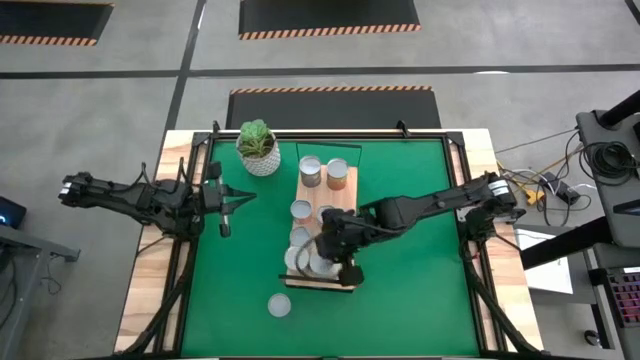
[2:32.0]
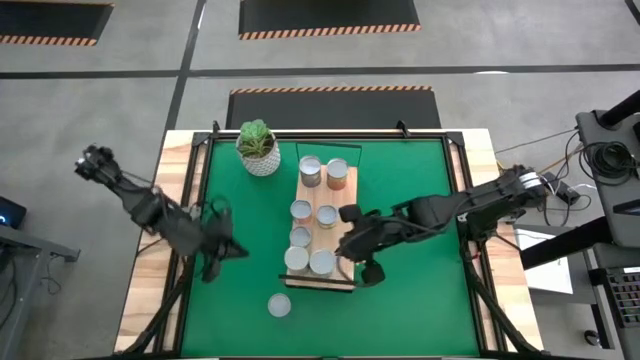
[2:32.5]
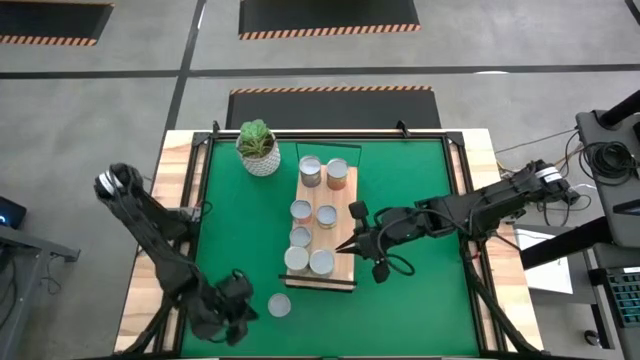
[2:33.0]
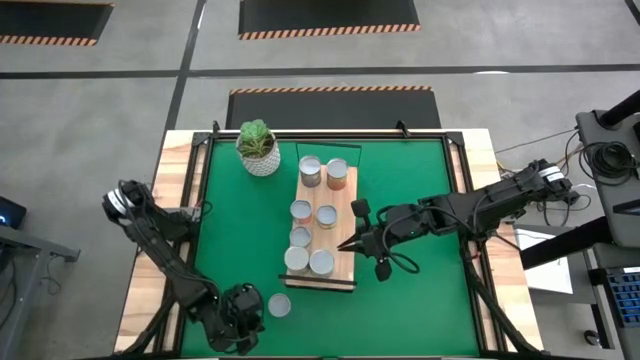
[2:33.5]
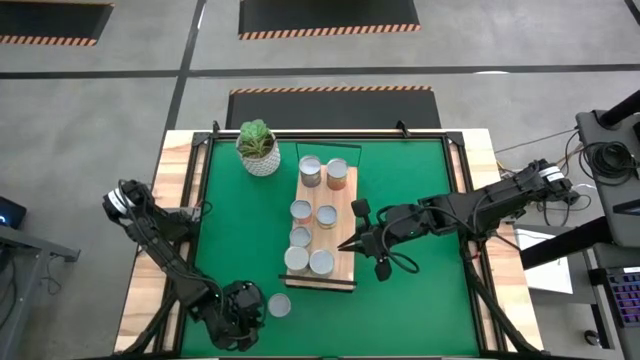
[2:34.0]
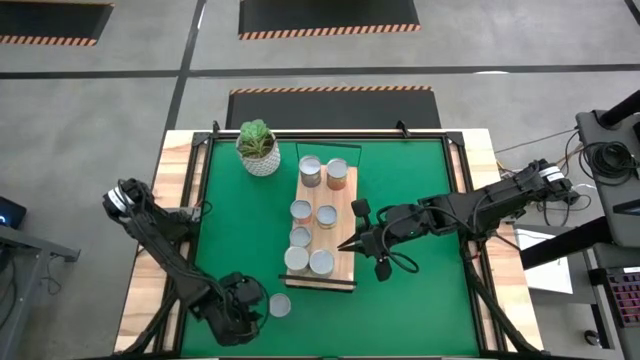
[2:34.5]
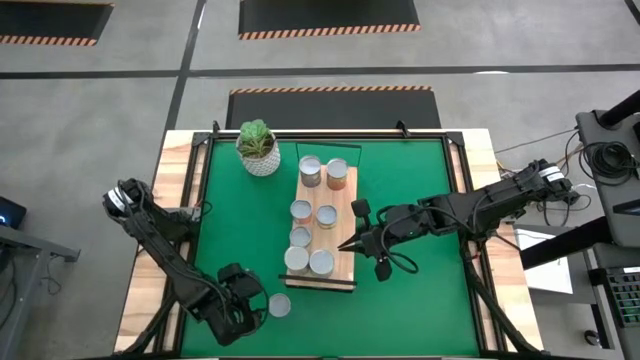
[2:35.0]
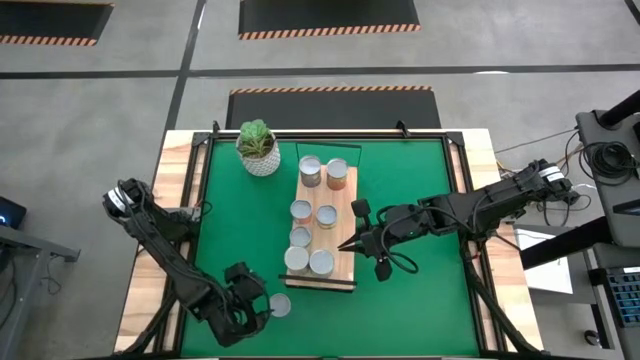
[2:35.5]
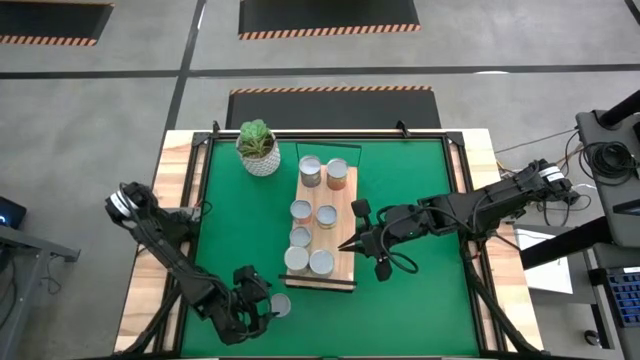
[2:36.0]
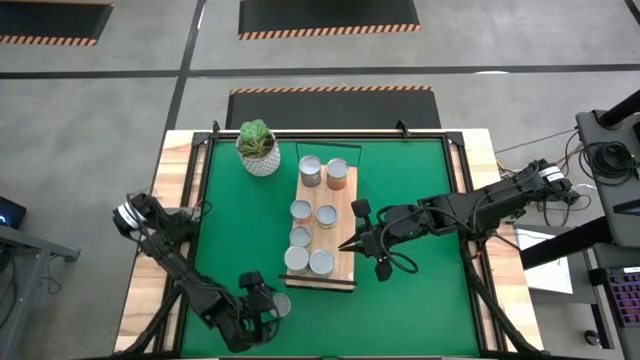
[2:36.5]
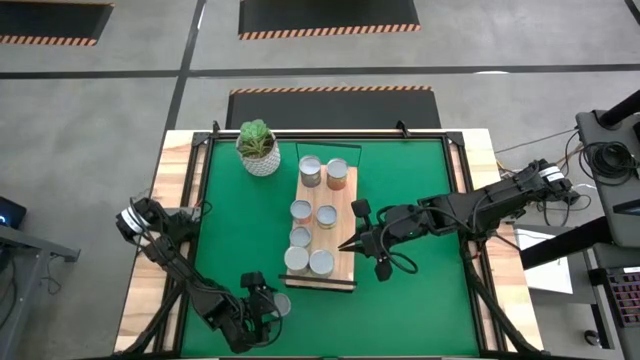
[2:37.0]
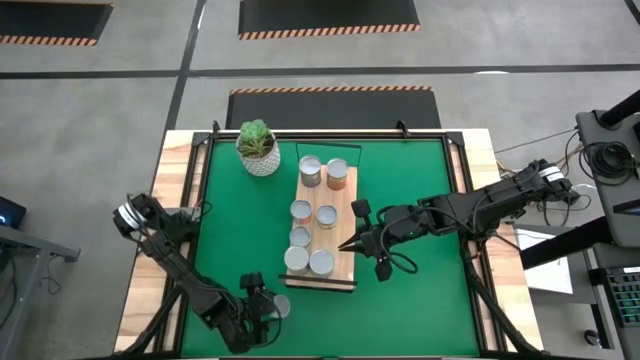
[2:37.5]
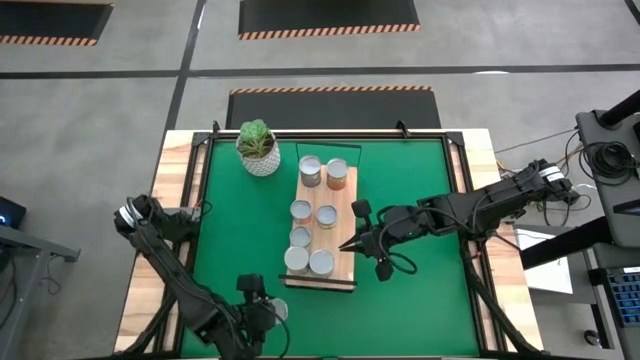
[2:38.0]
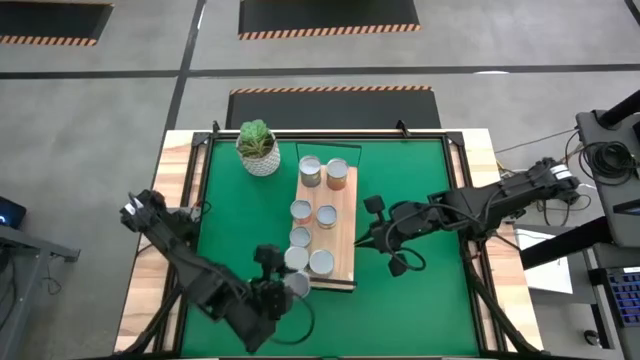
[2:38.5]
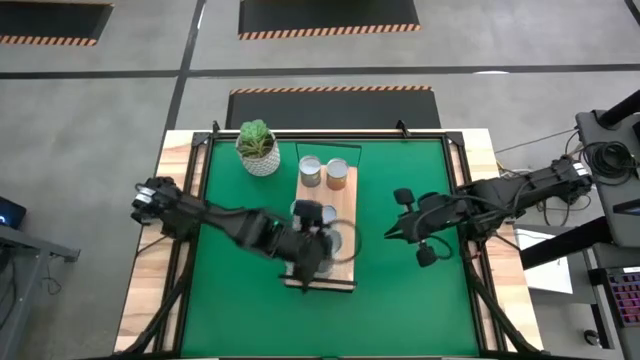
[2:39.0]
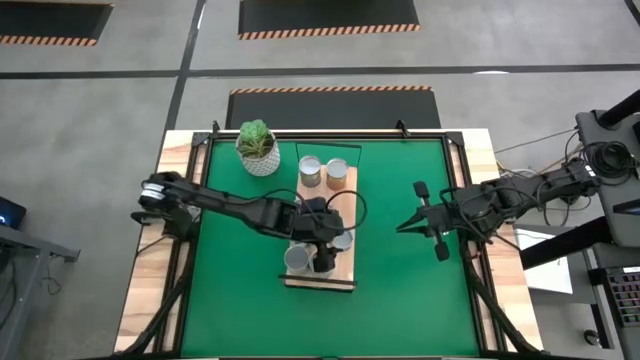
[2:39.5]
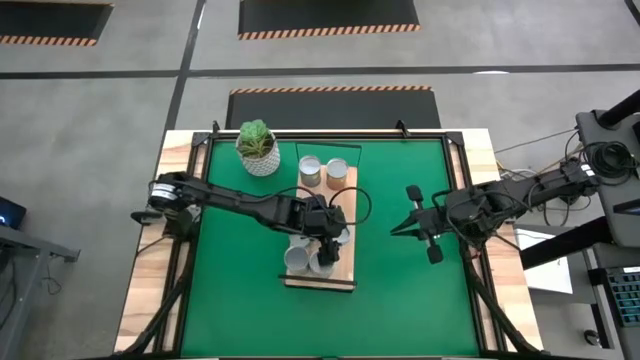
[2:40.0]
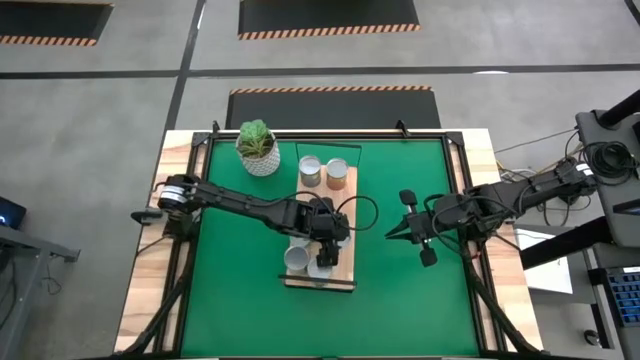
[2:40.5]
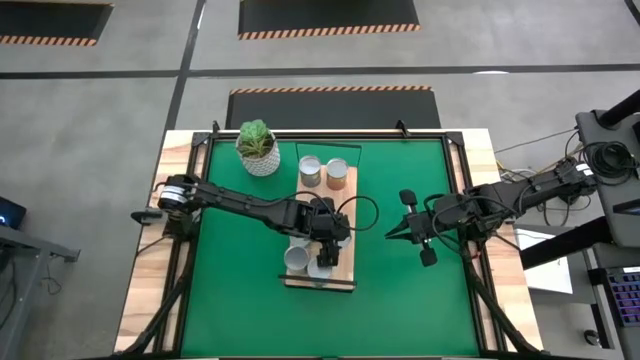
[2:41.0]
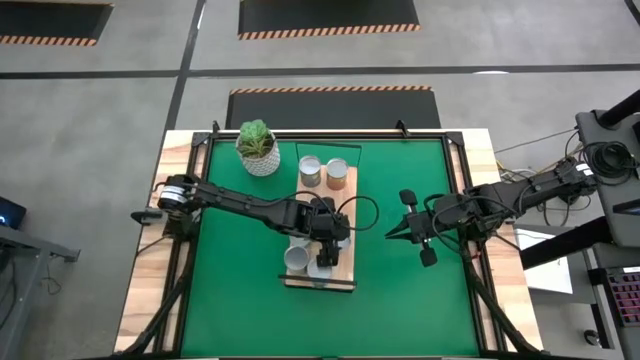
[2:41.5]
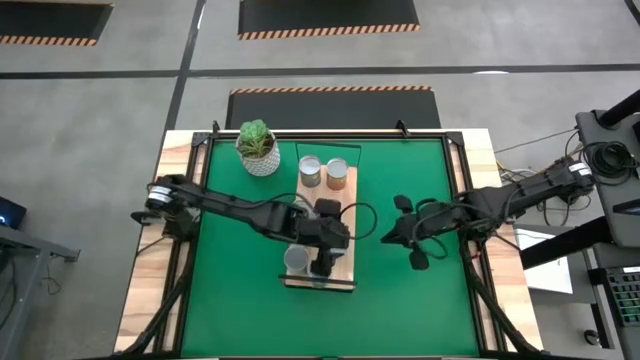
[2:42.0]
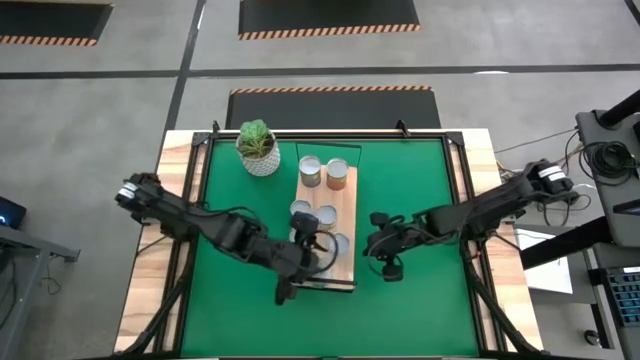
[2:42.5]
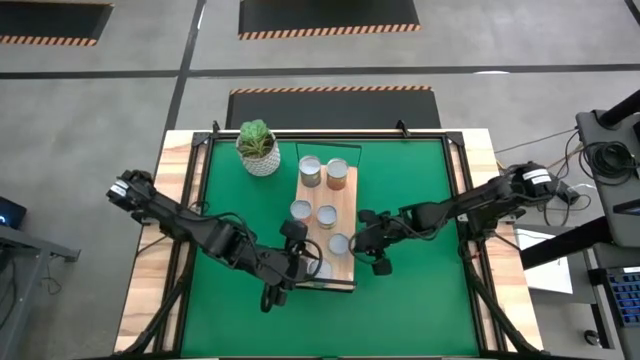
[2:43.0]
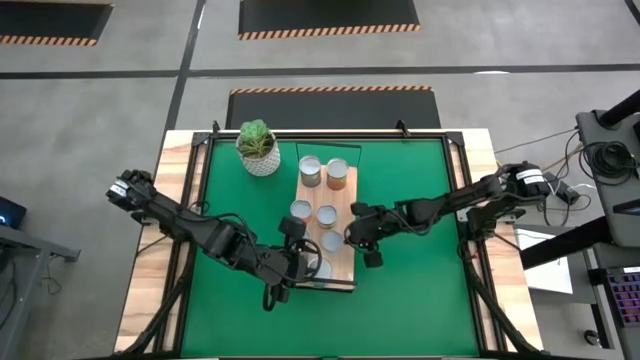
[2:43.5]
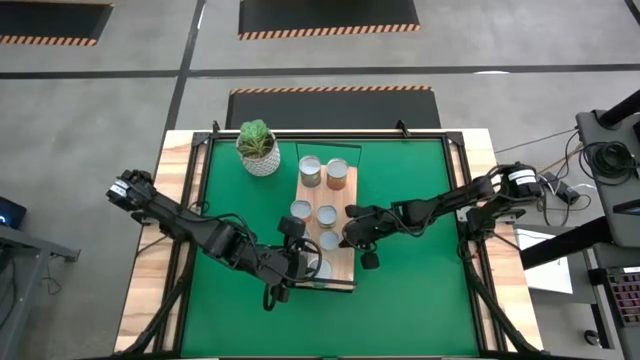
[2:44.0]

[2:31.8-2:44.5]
Task: Pick and place cans onto a shelf
Put the canned salmon on the shelf

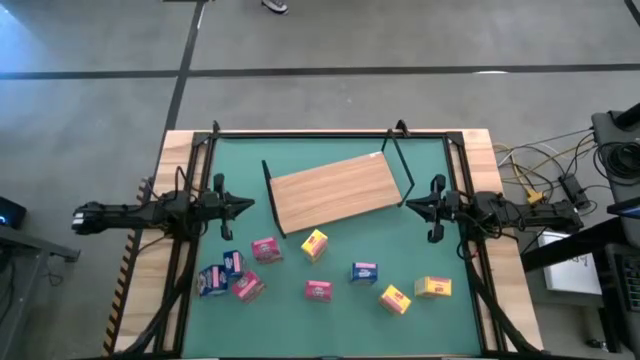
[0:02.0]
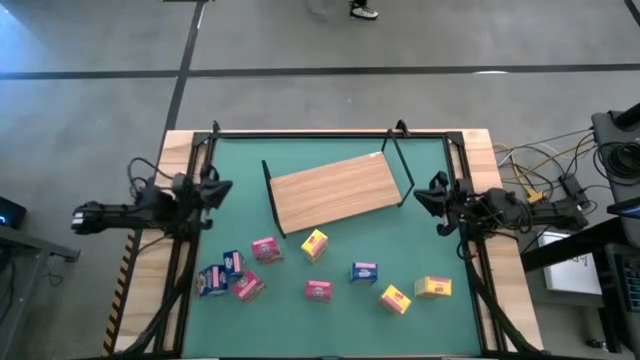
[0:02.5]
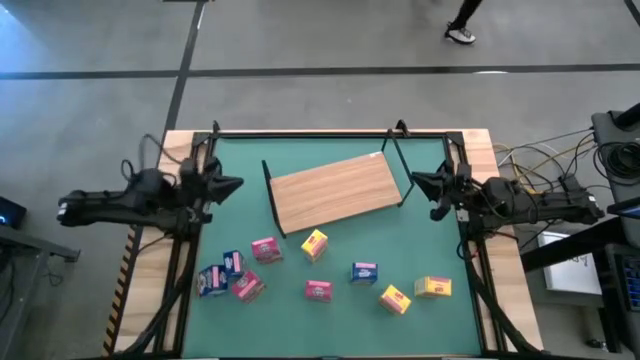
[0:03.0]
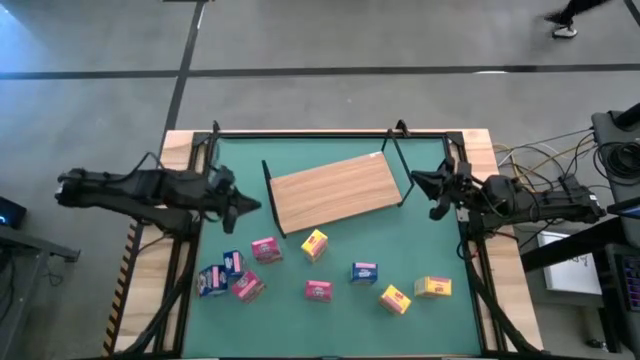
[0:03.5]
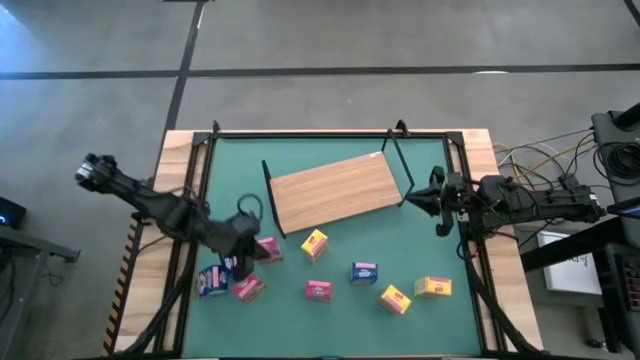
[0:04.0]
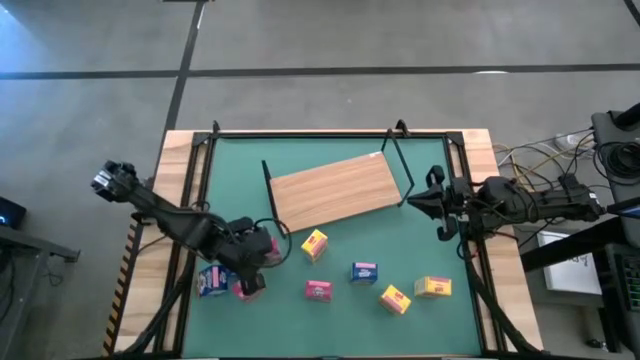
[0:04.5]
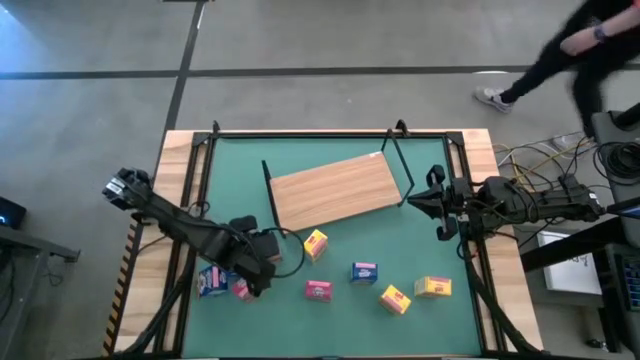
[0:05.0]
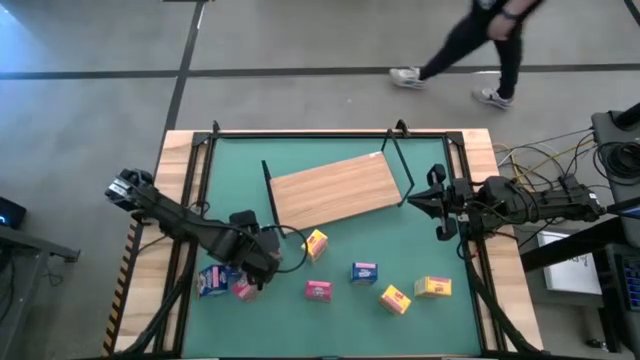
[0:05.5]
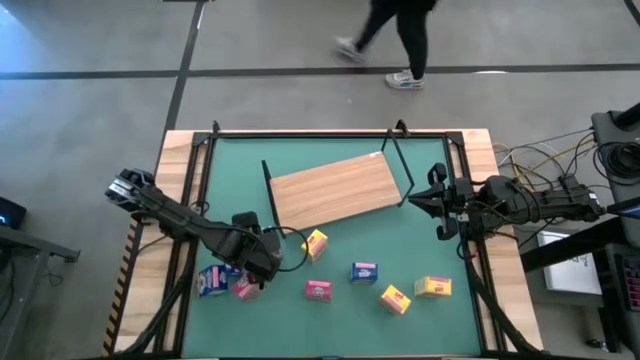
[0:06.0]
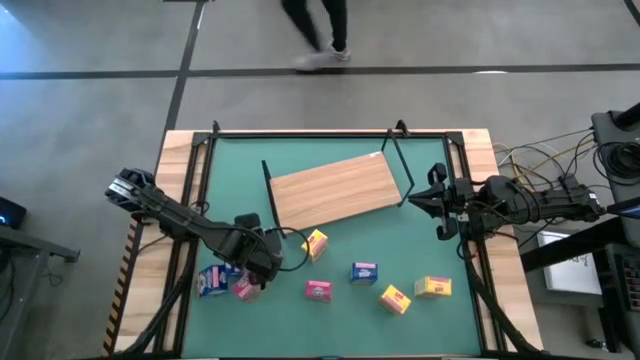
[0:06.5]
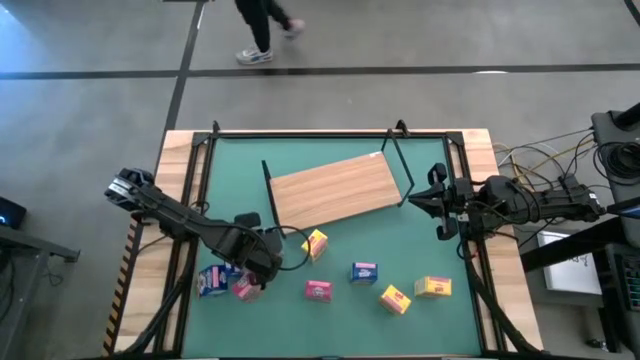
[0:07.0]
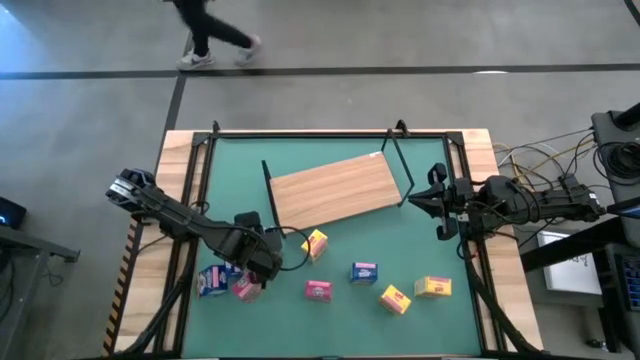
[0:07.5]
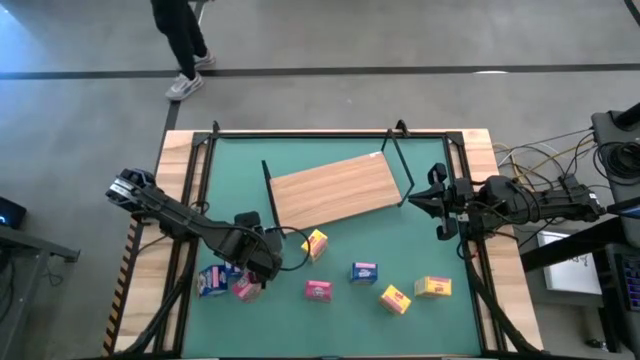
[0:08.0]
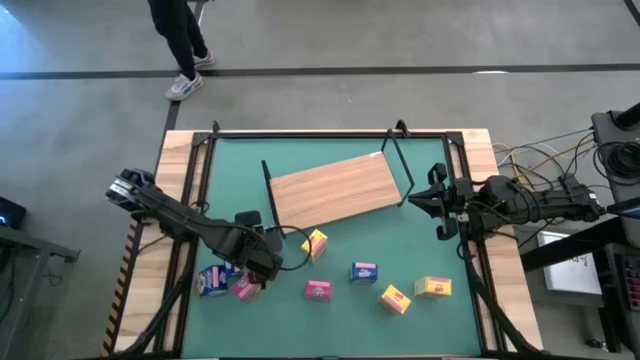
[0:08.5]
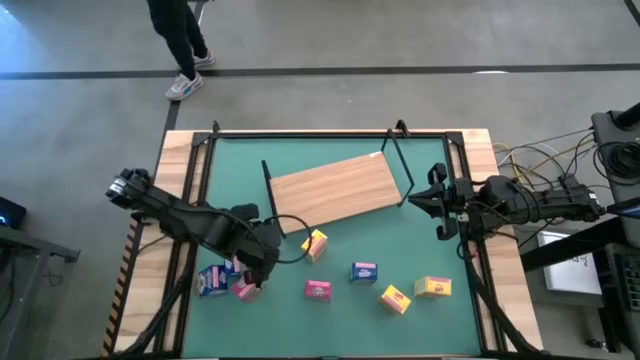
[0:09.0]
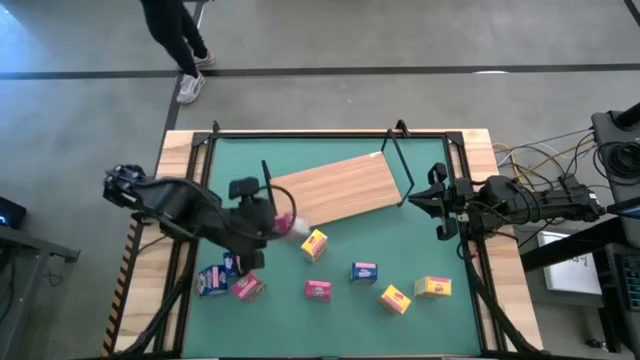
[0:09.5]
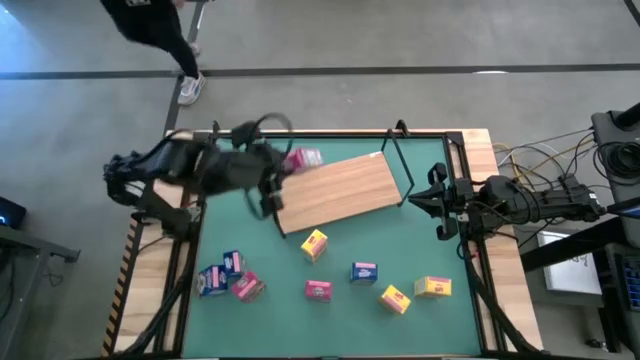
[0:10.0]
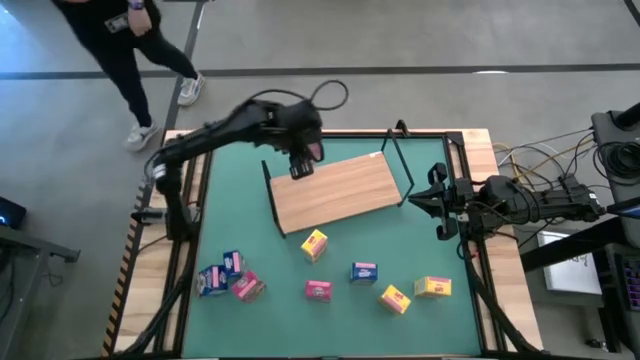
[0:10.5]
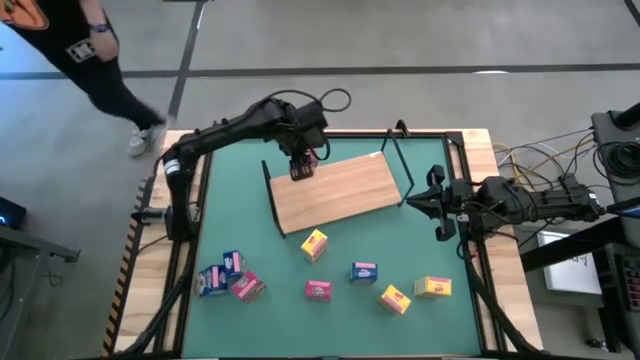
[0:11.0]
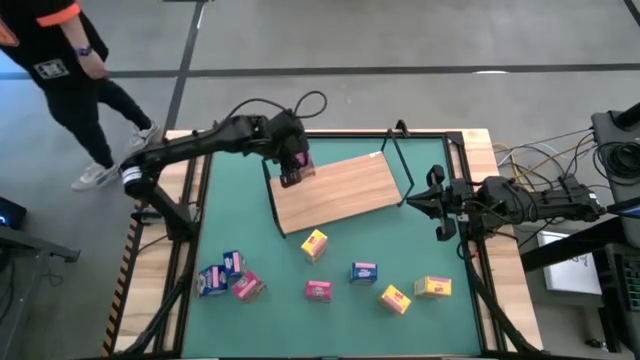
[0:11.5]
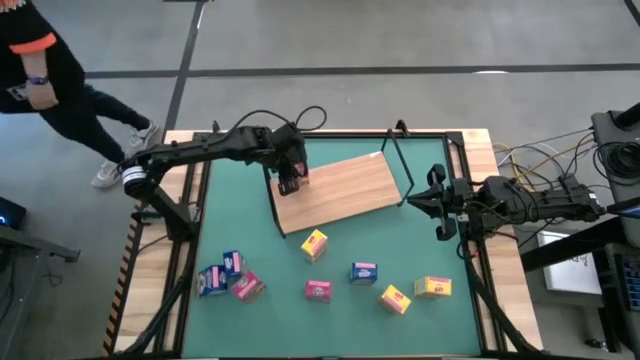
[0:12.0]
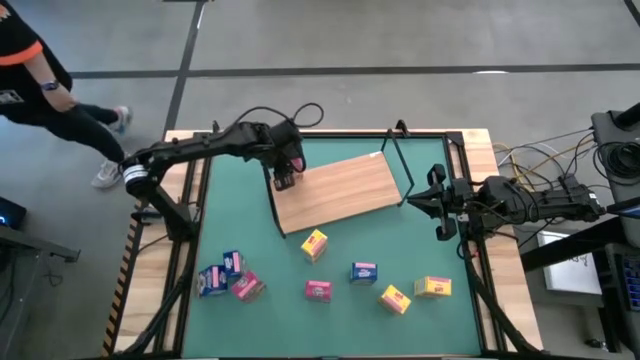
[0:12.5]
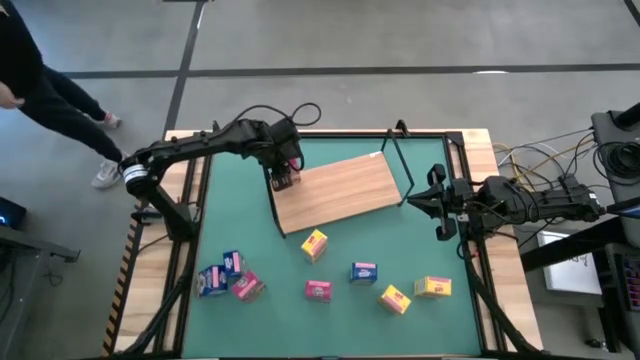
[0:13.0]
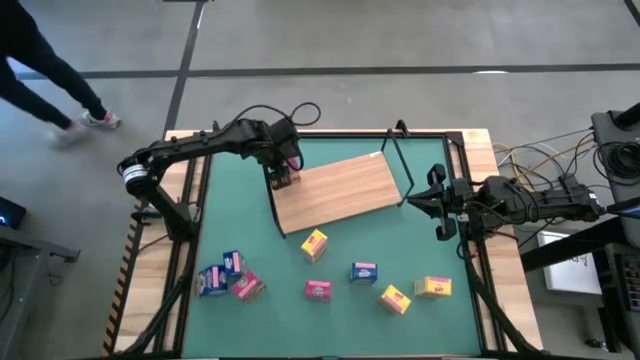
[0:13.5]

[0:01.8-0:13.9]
Task: Stack cereal on shelf
Put the top pink cereal box on the shelf
